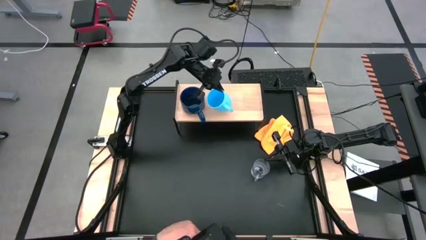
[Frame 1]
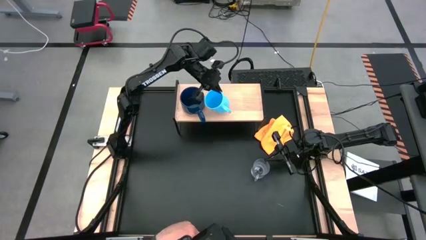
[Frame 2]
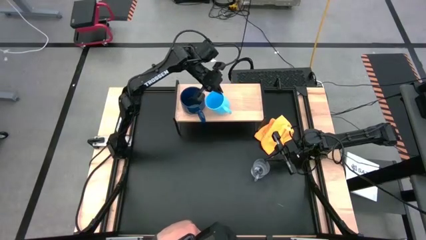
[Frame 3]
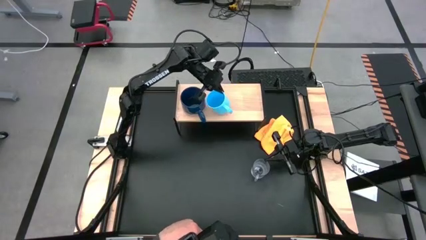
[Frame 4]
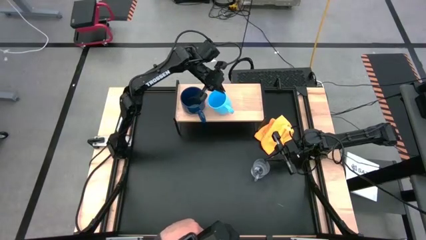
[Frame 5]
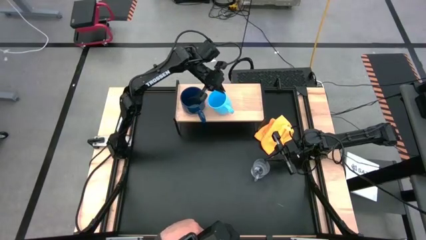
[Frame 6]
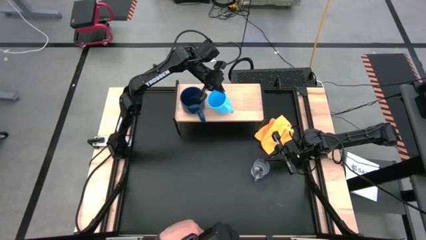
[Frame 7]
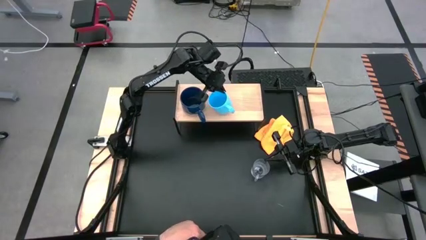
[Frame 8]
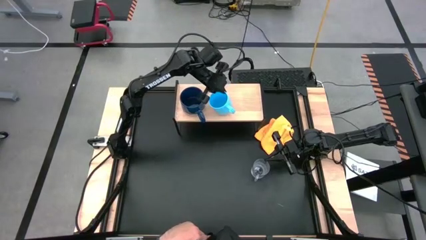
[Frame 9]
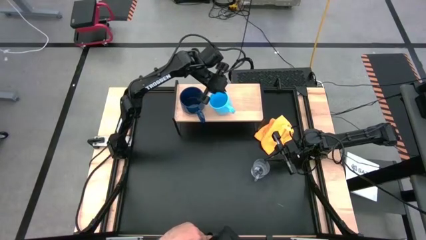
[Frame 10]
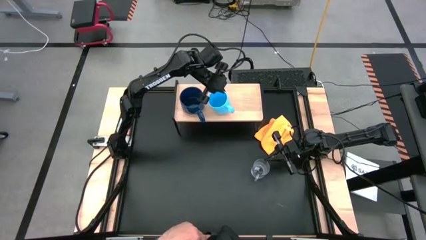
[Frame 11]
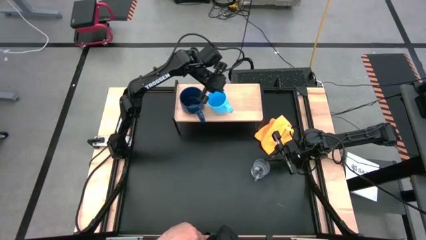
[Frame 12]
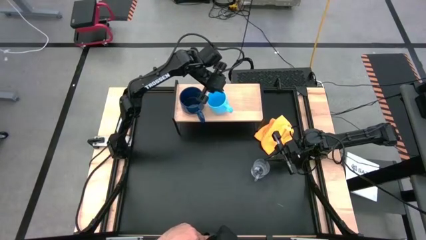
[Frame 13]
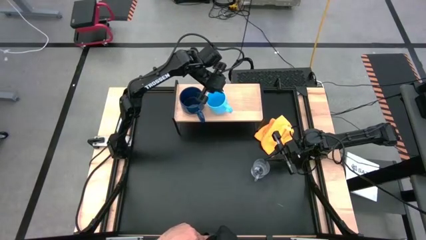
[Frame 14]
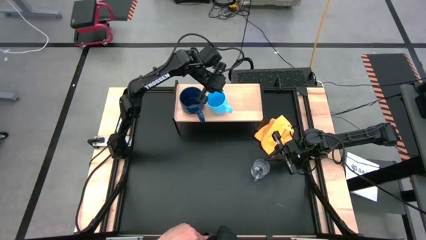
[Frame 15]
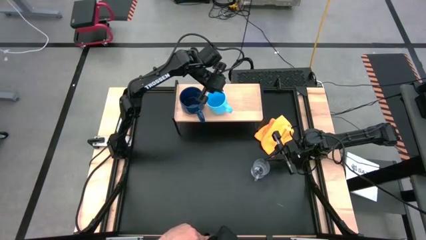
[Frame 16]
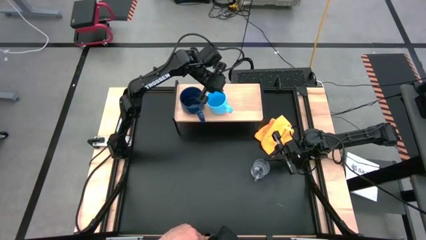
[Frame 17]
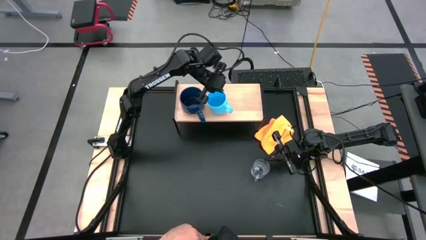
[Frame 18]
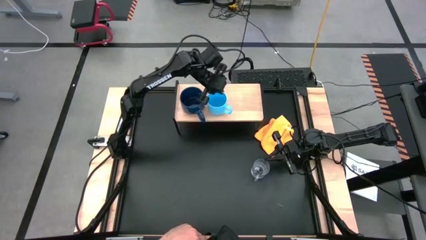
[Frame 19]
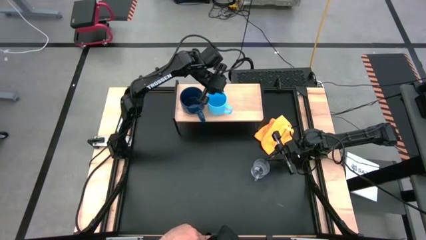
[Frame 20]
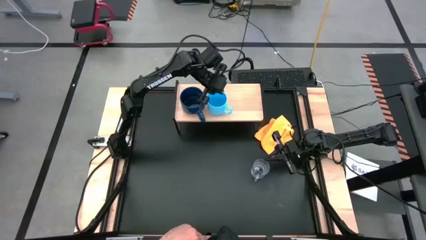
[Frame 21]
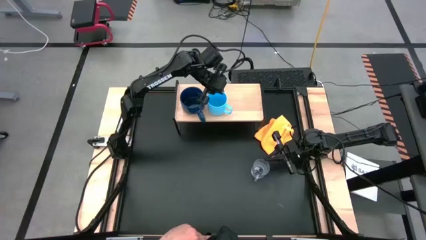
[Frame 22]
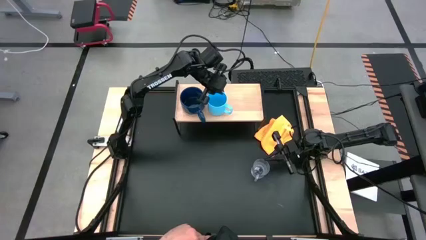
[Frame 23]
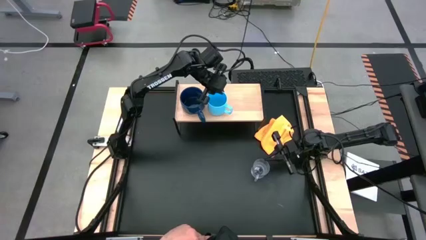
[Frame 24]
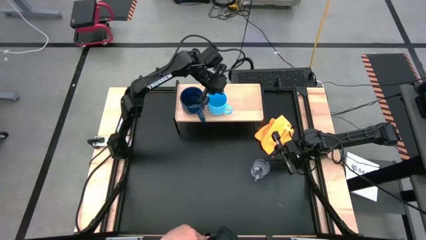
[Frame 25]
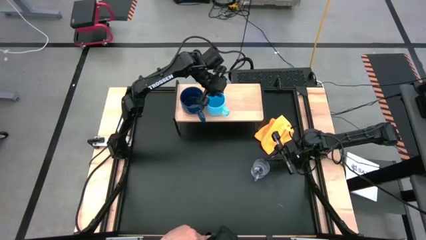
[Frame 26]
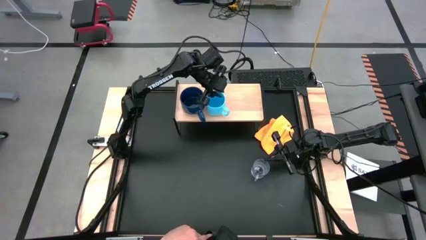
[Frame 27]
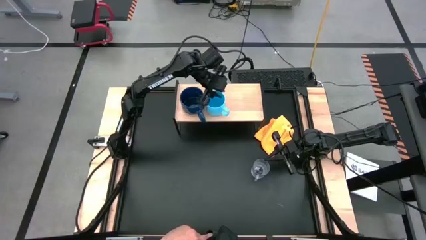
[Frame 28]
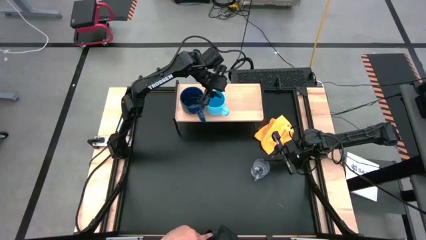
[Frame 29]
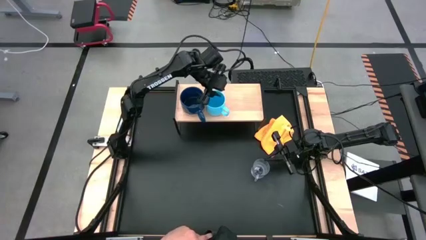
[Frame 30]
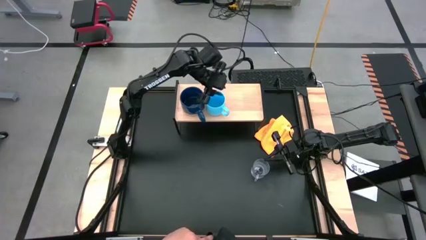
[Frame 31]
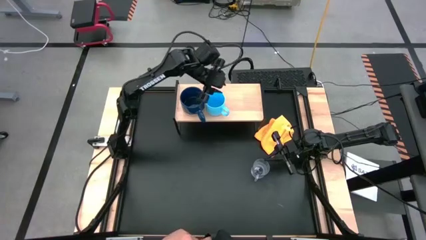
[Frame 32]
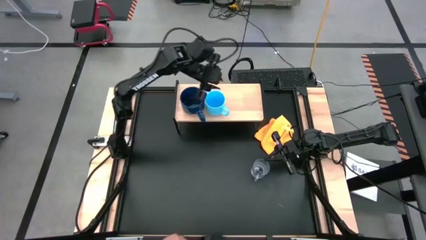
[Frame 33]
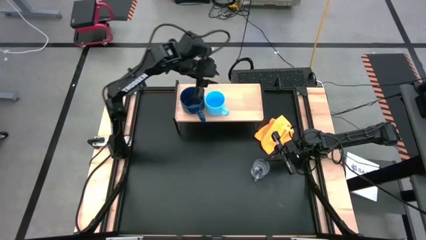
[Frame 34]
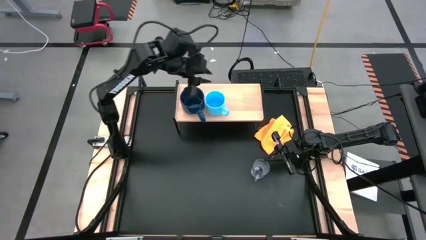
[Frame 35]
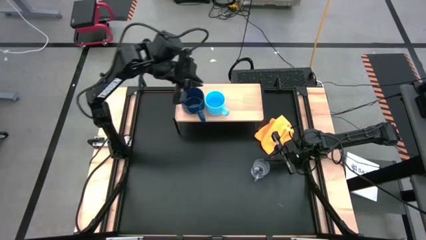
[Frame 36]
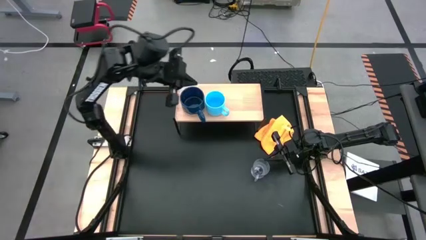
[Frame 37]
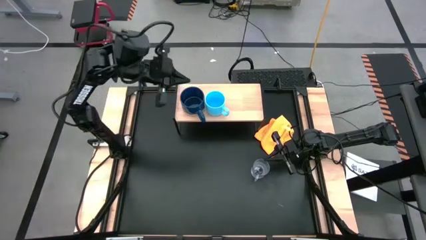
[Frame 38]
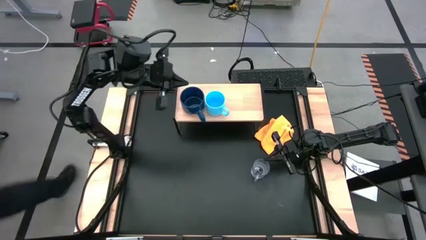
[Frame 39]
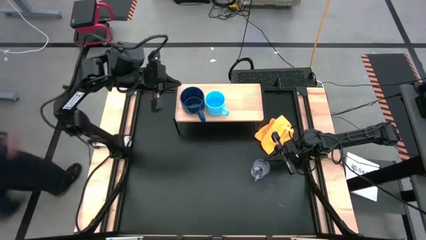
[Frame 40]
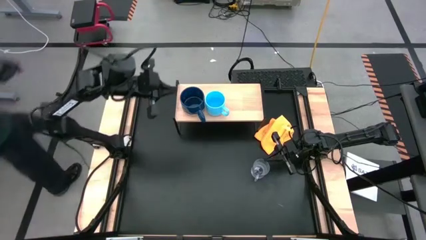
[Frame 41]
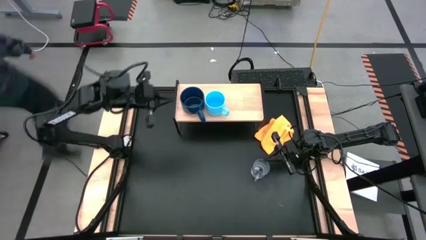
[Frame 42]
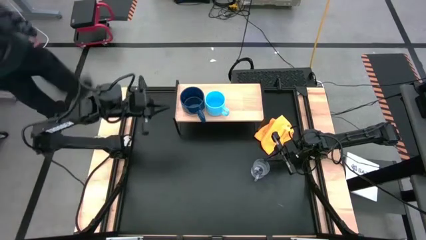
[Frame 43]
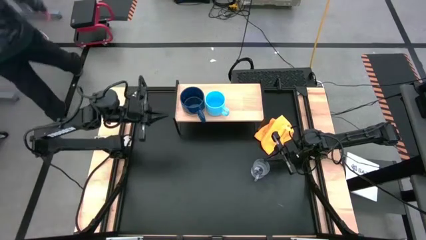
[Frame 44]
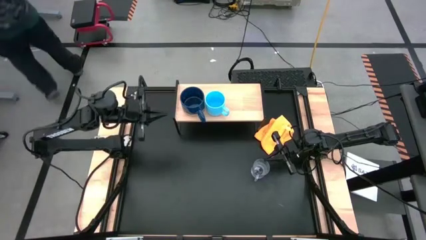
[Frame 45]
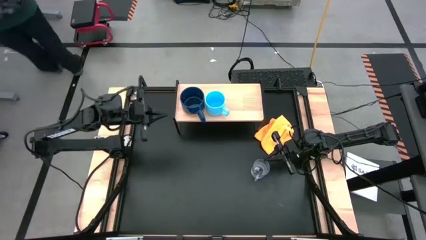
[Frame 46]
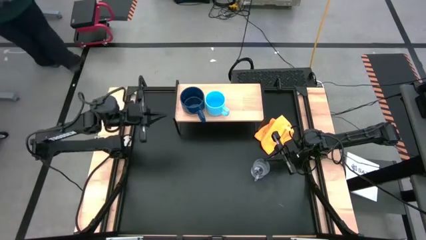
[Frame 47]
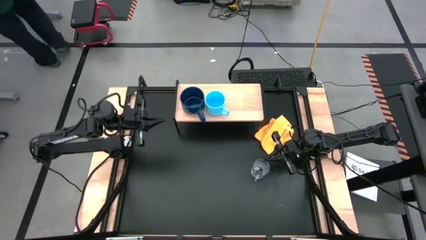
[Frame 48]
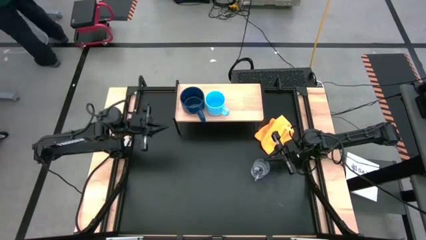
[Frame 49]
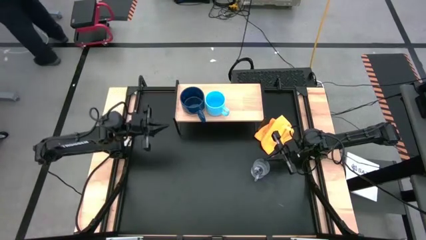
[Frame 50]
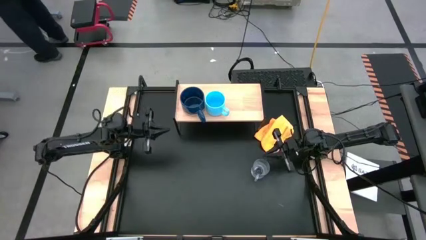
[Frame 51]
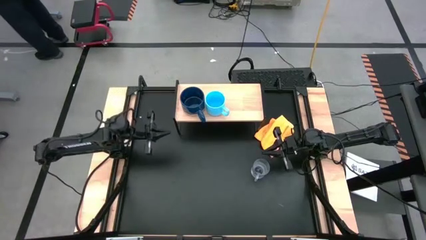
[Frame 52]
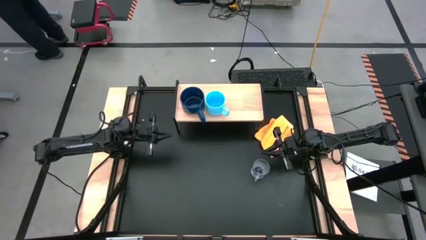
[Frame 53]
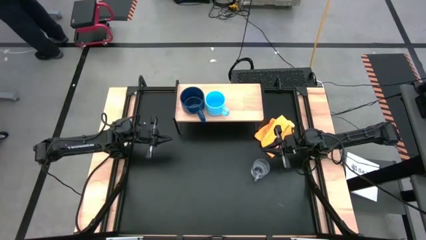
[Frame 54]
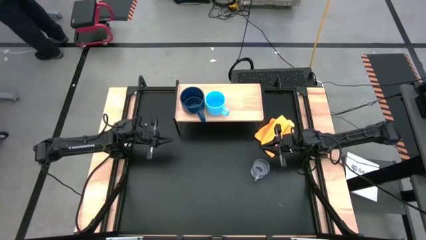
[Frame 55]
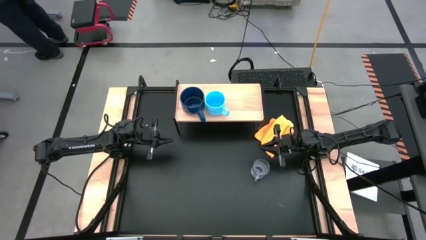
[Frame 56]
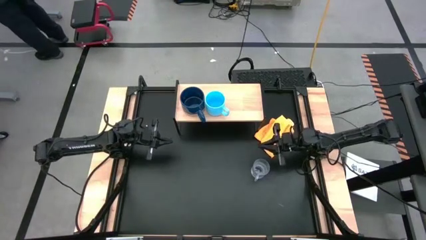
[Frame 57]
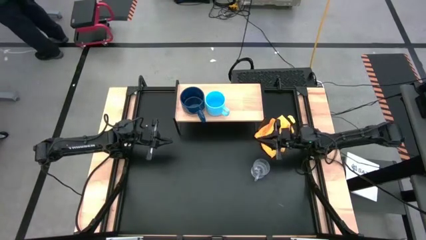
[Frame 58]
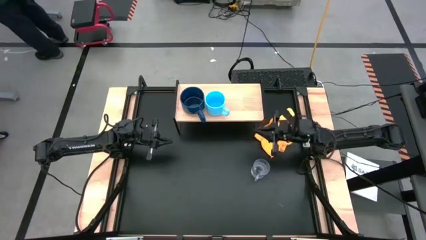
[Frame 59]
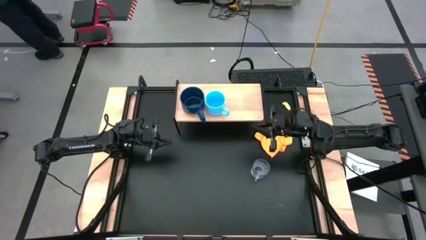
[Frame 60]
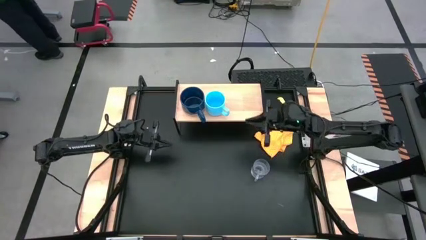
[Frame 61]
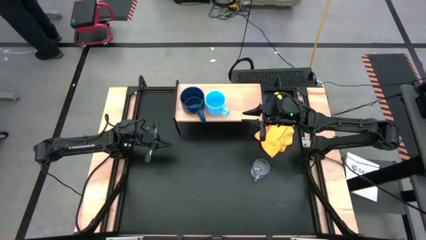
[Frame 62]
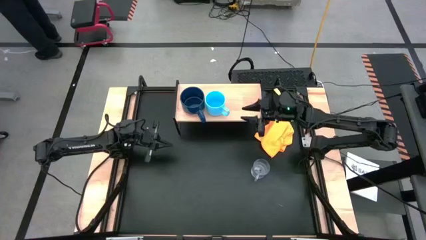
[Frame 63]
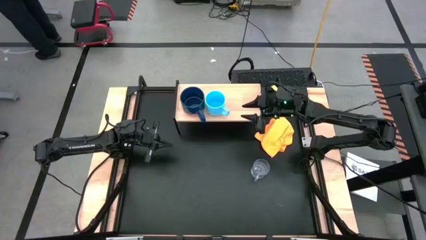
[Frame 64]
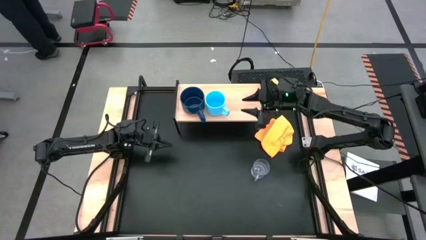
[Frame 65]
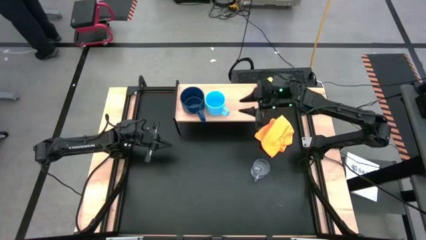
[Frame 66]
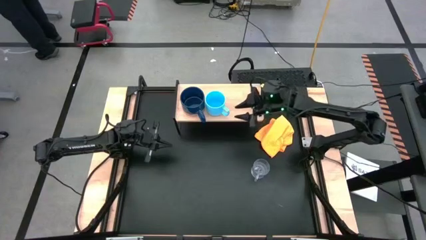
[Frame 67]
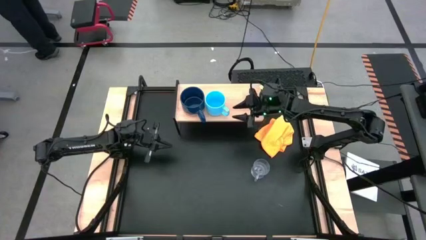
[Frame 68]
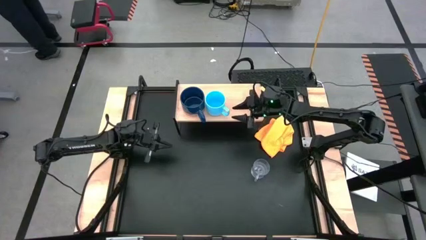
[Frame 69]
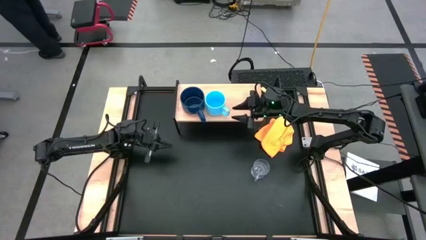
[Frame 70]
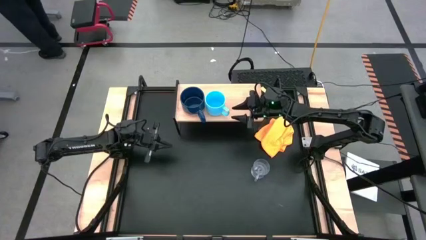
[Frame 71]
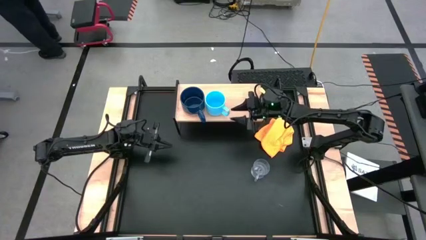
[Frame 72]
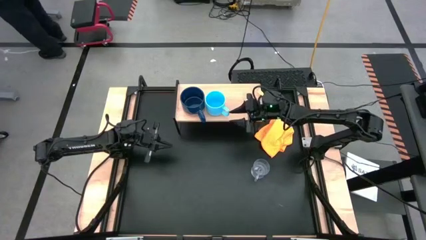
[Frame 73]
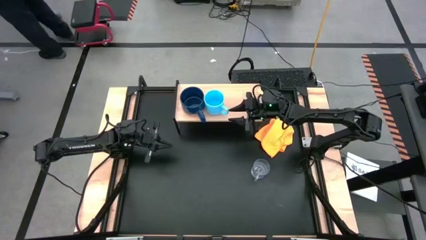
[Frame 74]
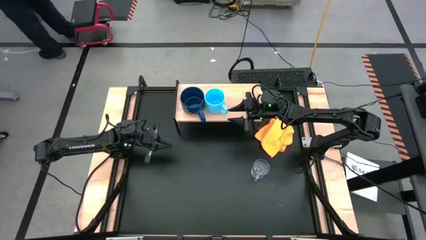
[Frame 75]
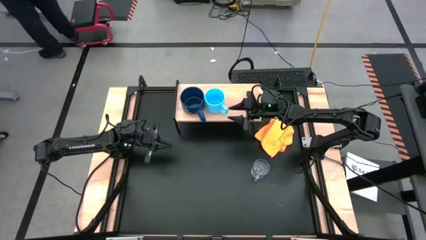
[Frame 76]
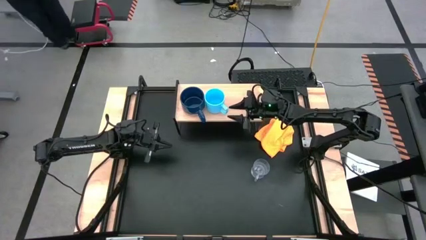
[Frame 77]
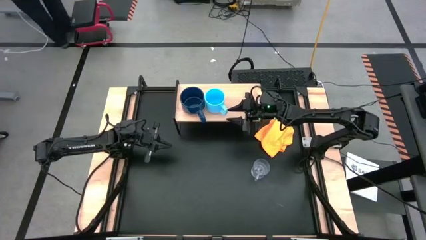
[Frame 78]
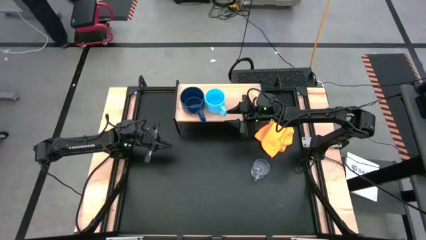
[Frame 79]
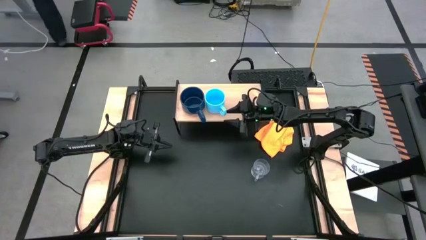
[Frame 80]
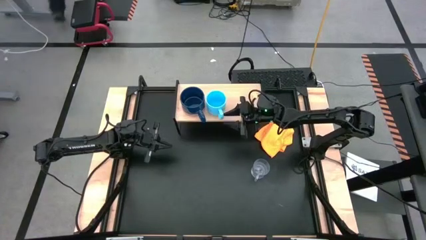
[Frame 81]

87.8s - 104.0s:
Task: Stack small to large cups/mugs on shelf
Put the blue mug on the shelf
